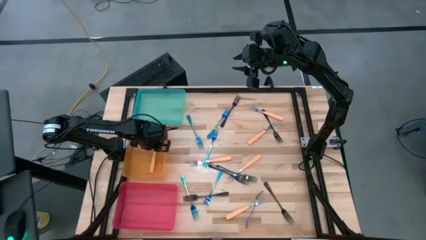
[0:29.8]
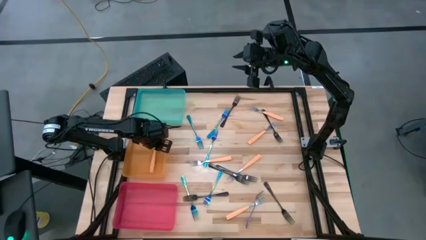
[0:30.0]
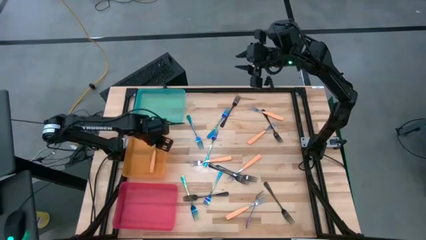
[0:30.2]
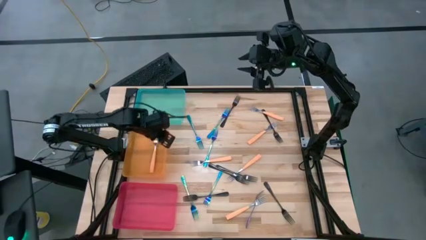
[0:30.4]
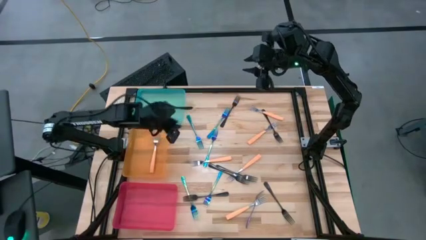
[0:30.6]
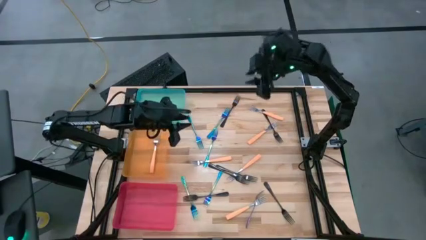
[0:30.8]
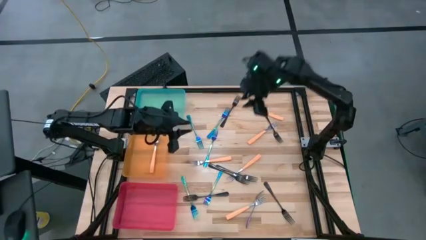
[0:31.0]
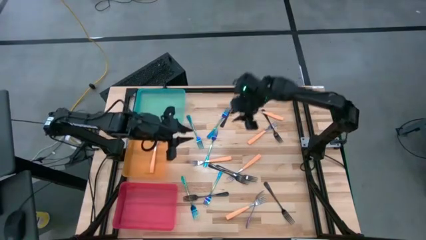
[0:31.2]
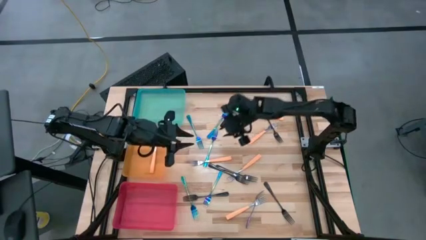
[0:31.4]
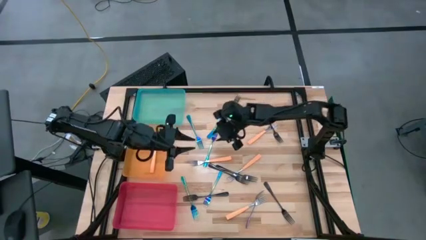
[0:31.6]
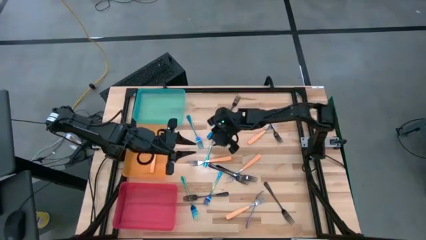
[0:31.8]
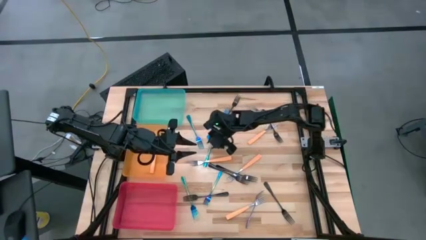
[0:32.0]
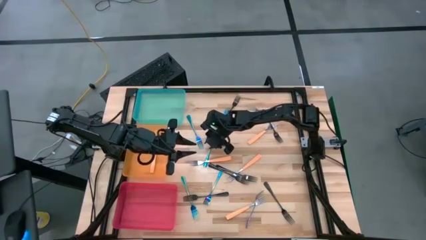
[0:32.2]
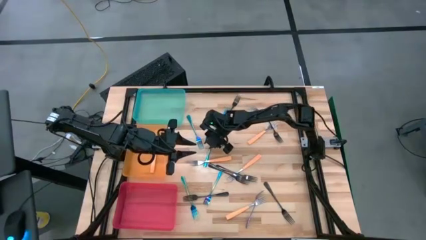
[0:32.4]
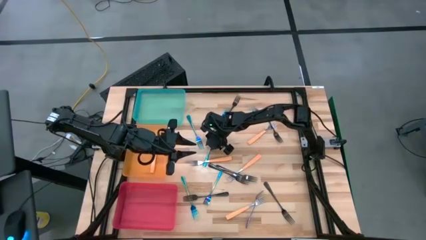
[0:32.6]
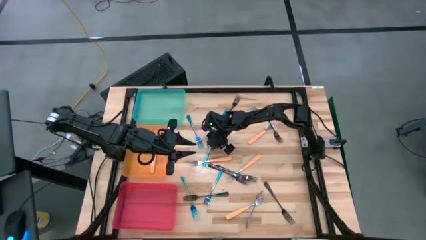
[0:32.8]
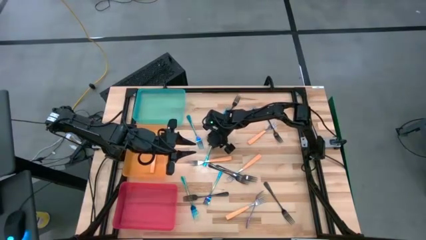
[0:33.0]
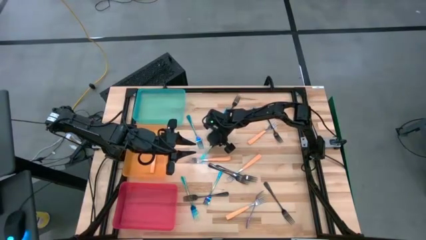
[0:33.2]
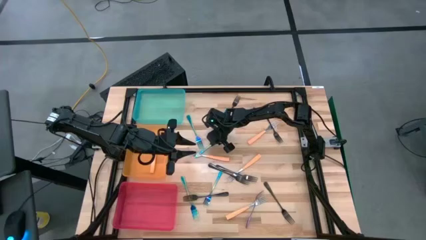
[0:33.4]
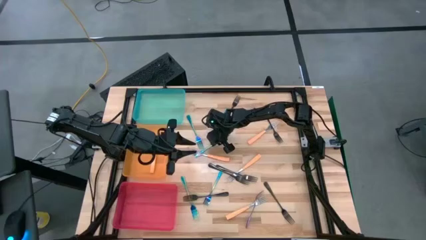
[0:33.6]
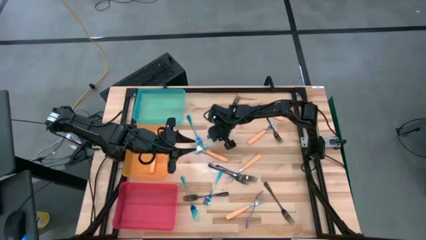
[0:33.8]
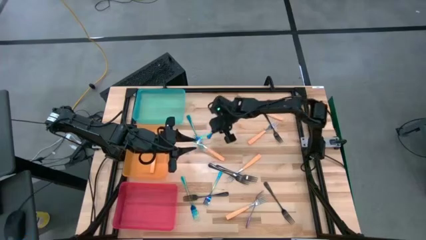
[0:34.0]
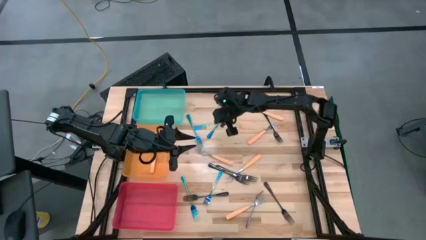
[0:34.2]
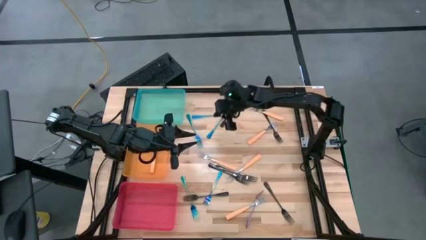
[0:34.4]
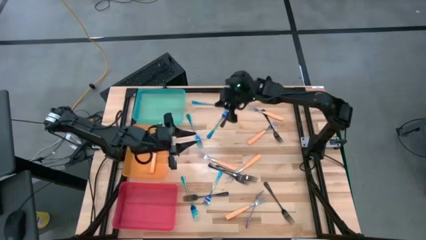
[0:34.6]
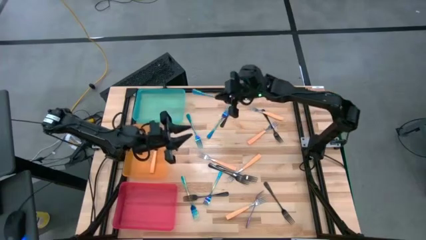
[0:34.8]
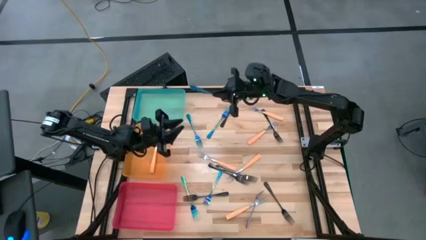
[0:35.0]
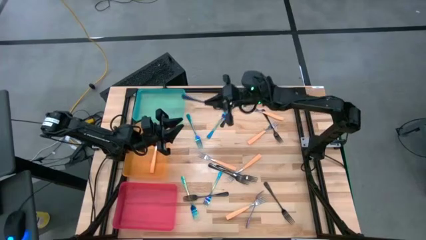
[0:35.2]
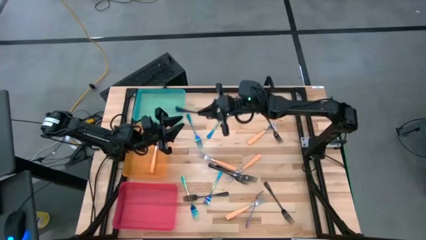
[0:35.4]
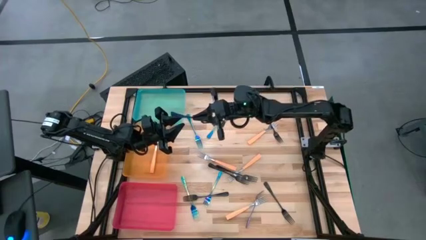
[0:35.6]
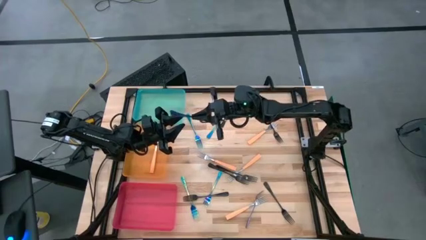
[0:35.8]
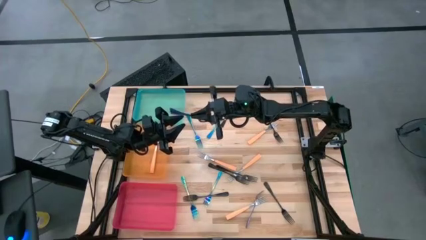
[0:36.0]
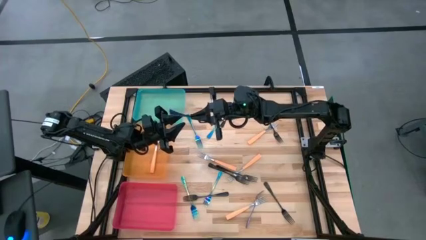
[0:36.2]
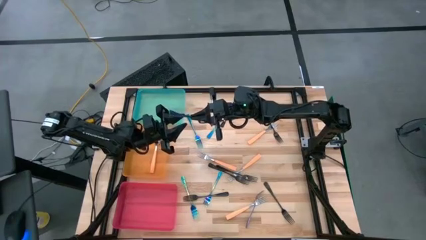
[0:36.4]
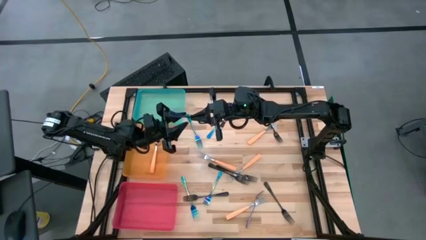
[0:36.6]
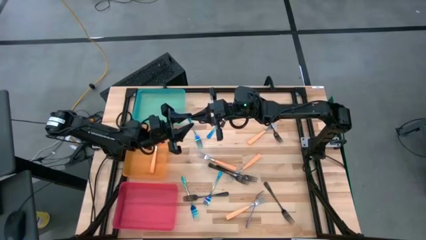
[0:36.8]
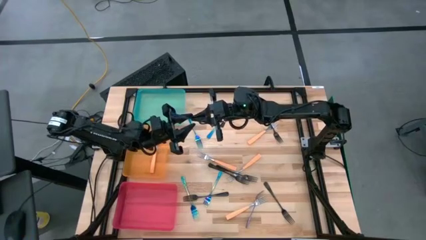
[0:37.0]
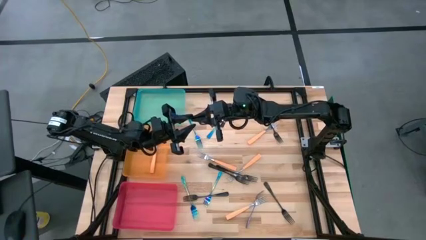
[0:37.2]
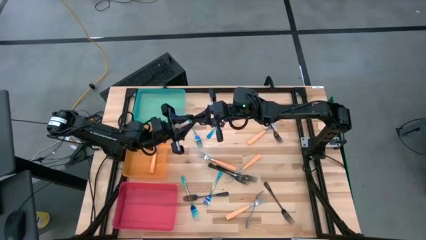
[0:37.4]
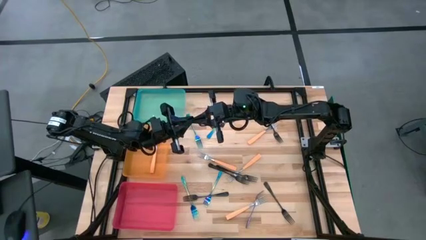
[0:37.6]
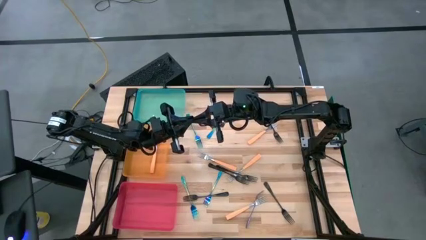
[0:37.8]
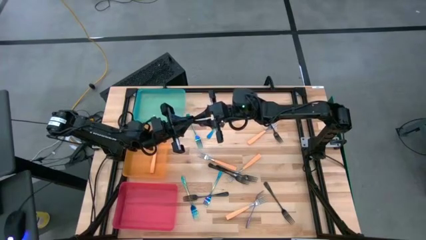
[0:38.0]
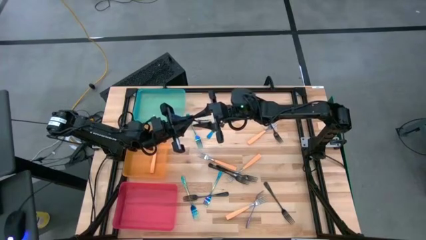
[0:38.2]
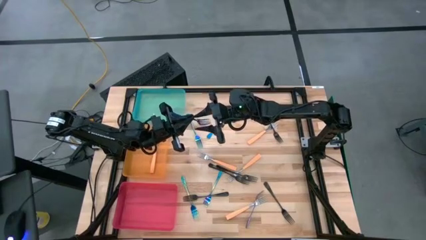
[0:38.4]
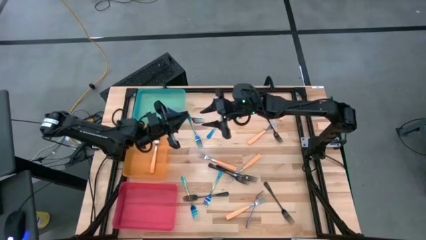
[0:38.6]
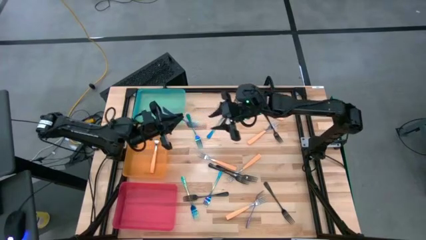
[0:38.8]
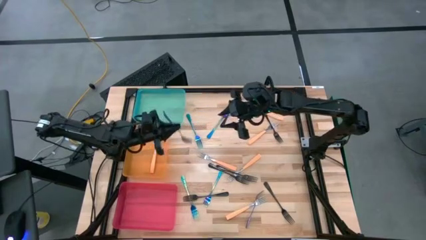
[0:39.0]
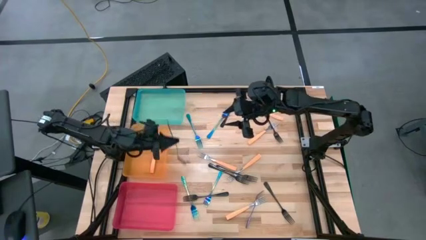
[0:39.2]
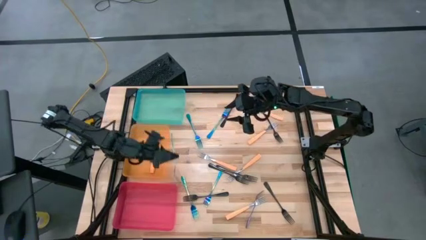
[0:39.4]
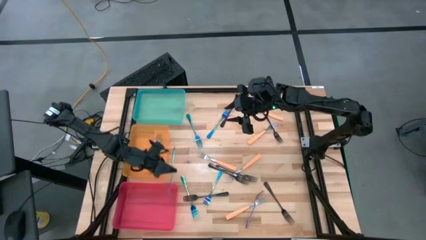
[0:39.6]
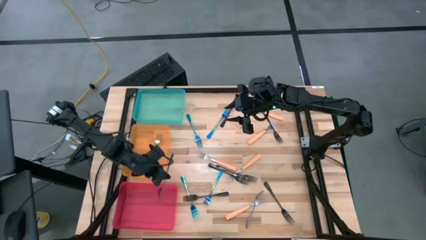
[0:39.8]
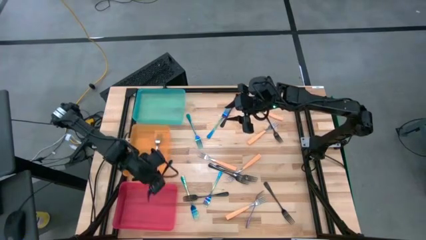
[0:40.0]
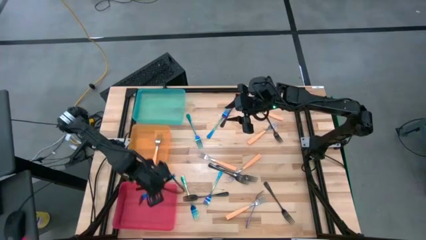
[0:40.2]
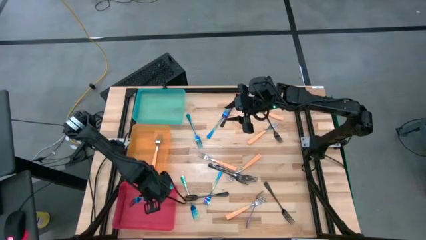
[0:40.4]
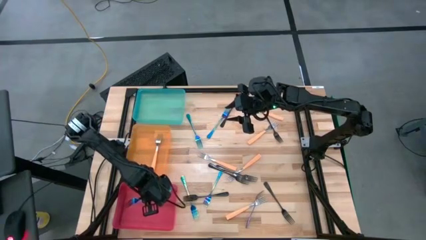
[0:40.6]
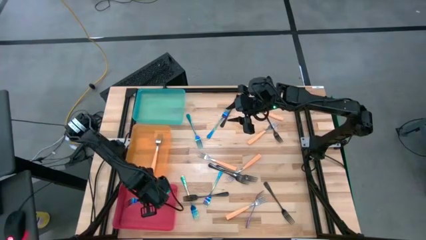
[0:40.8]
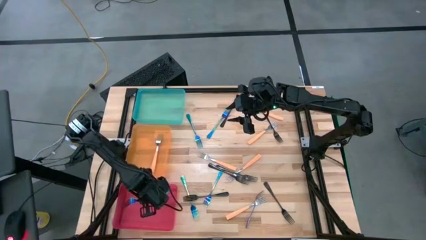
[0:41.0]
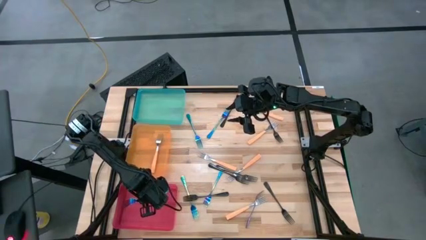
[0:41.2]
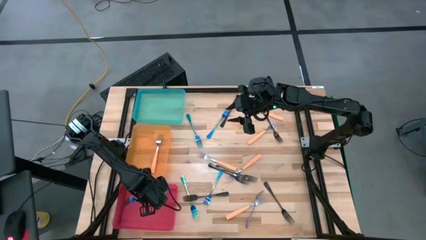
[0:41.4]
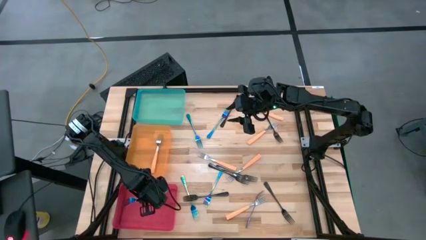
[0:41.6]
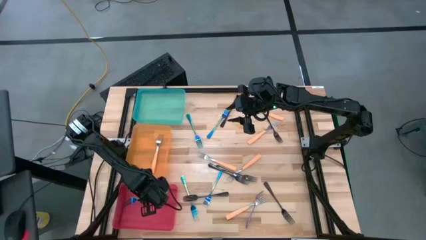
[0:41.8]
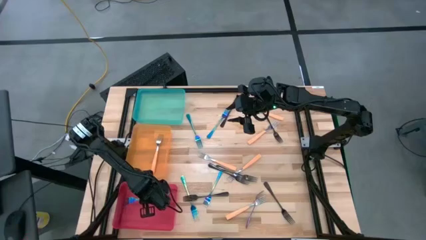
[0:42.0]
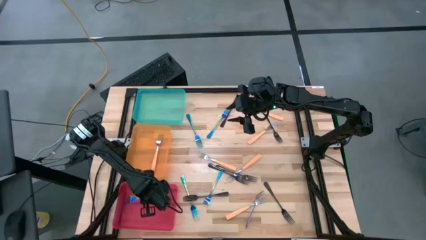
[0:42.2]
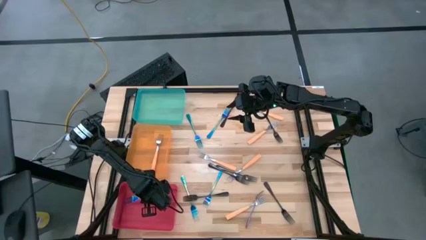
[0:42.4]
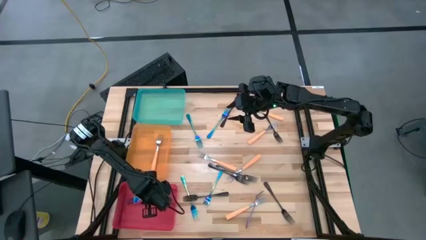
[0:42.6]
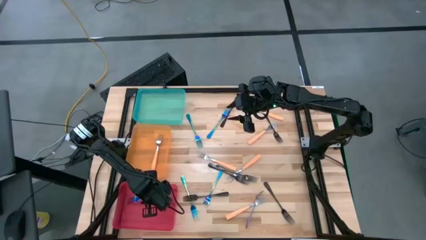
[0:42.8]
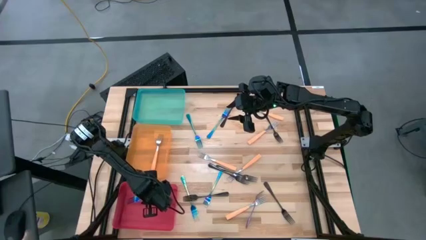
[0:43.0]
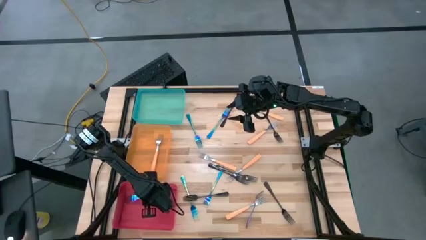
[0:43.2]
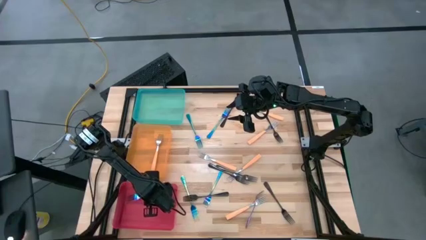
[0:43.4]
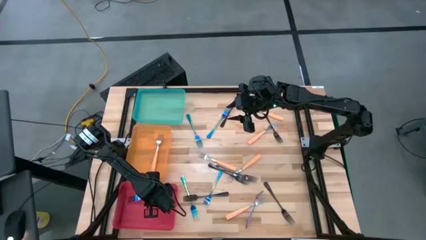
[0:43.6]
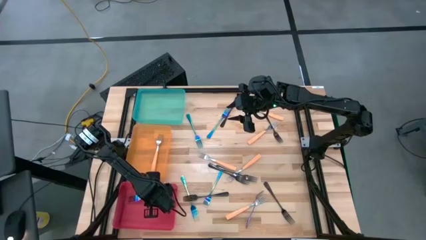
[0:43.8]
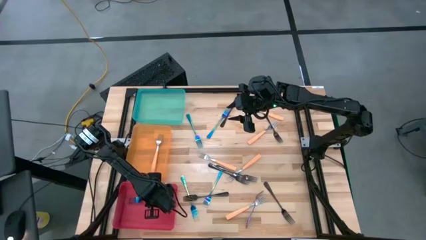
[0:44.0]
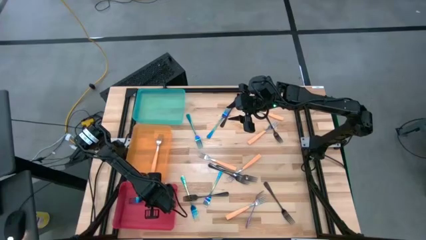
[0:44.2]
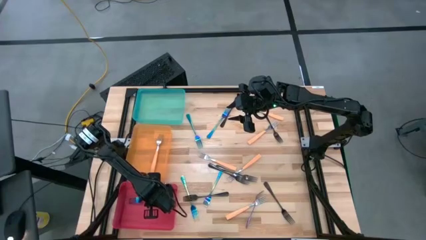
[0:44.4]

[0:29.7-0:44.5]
Task: Sort silverware by color (type)
Put the blue fork into the pink bin
